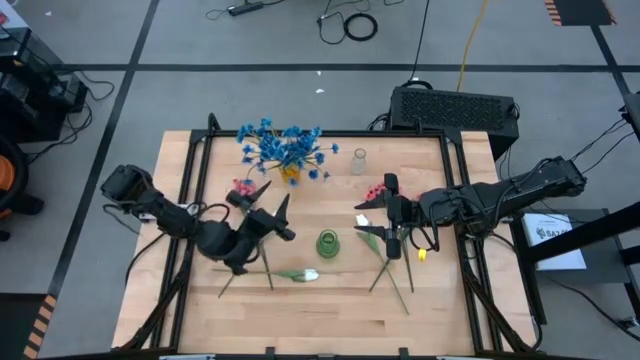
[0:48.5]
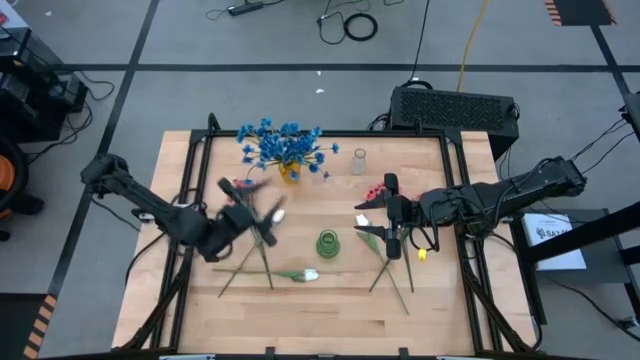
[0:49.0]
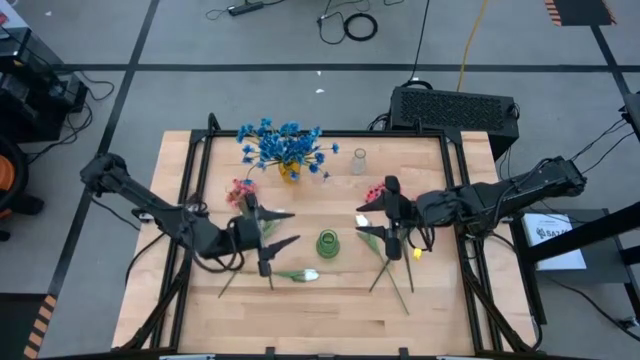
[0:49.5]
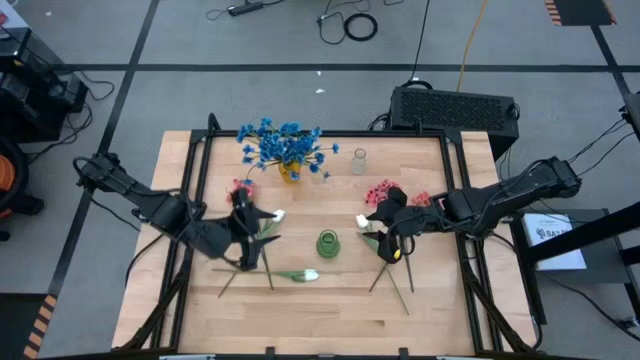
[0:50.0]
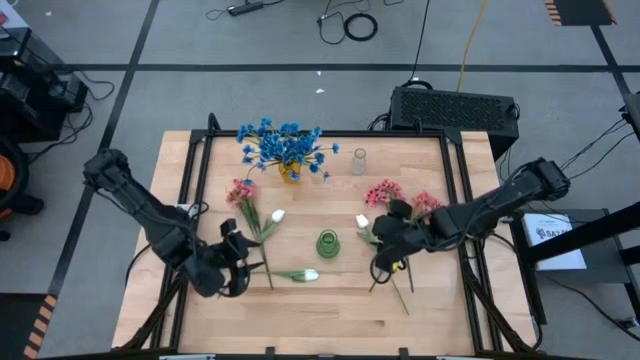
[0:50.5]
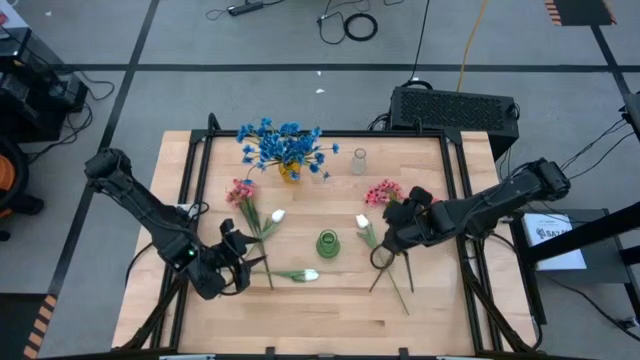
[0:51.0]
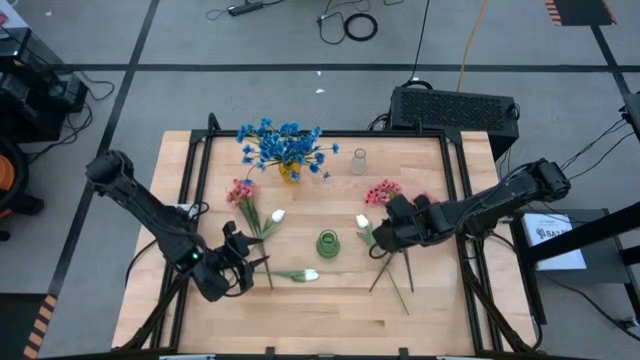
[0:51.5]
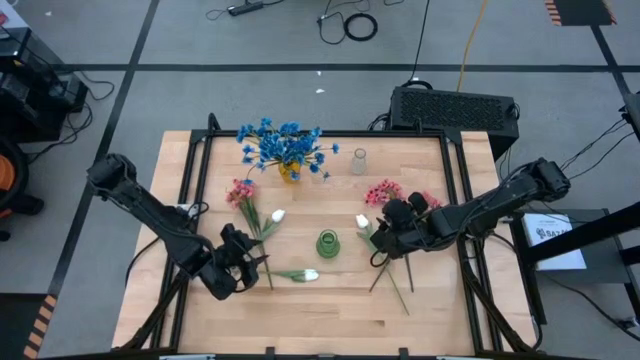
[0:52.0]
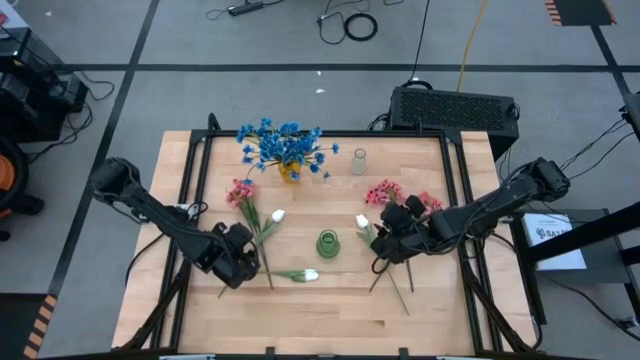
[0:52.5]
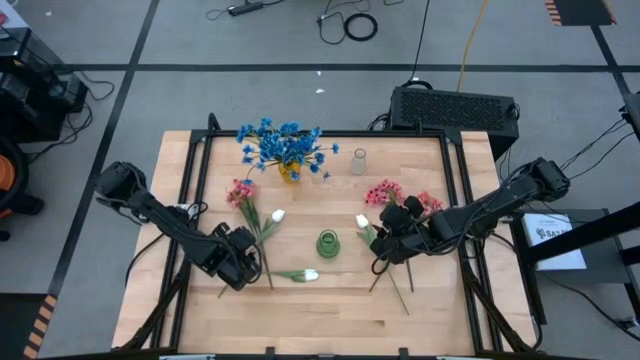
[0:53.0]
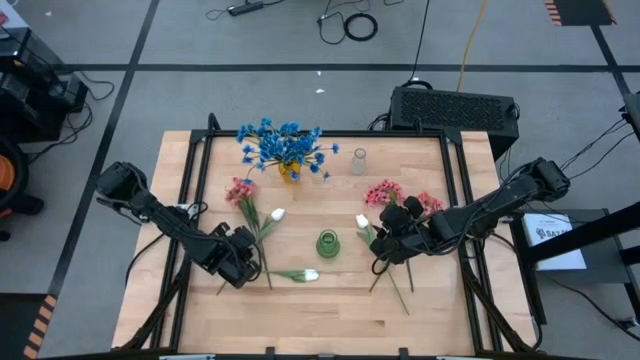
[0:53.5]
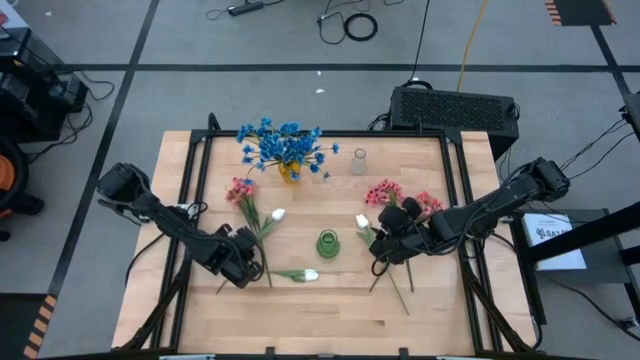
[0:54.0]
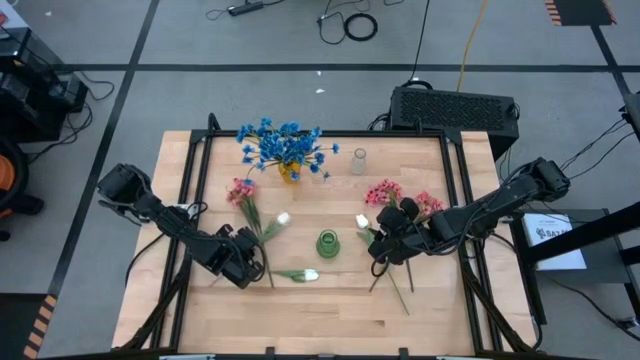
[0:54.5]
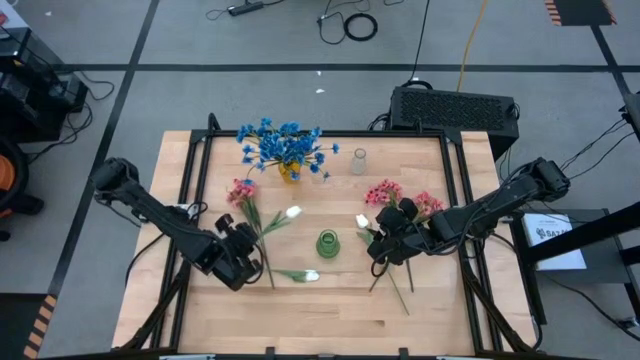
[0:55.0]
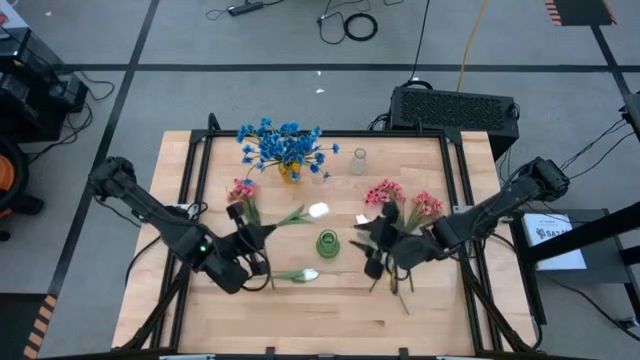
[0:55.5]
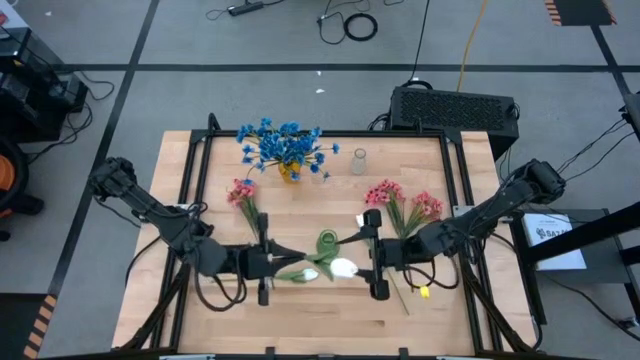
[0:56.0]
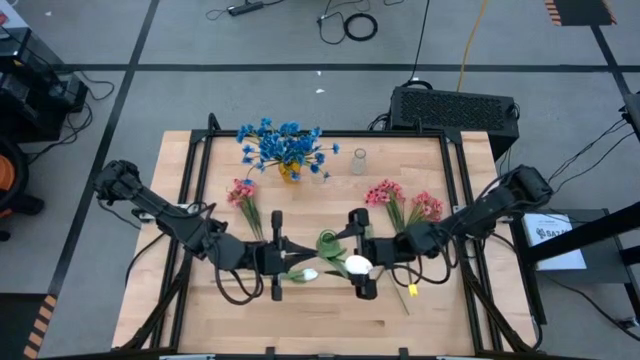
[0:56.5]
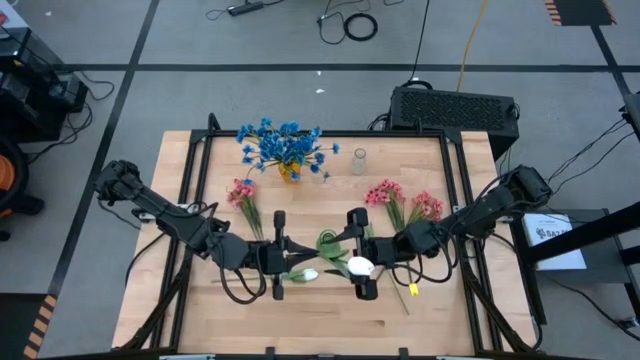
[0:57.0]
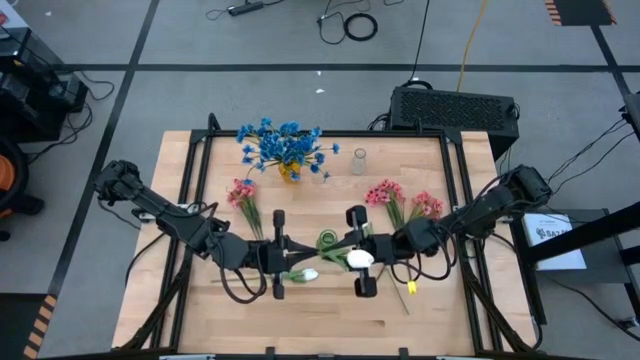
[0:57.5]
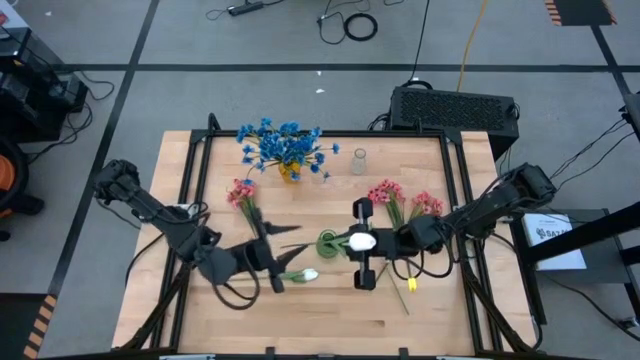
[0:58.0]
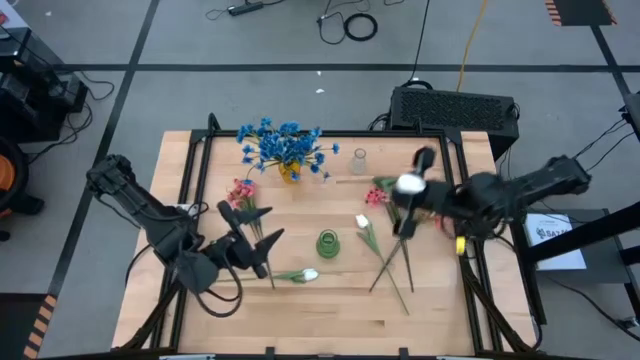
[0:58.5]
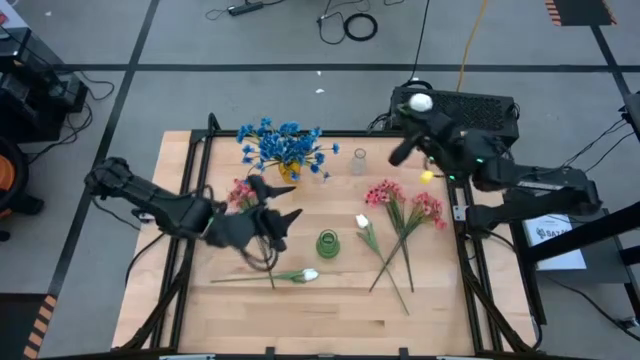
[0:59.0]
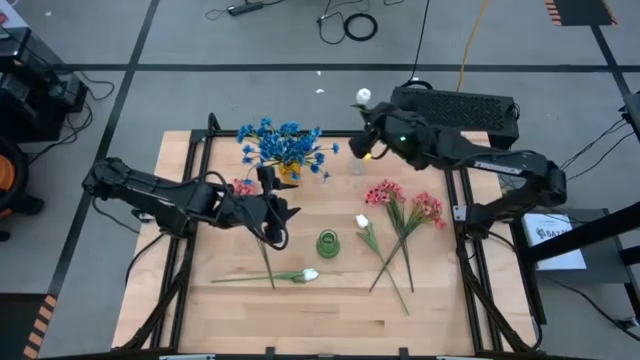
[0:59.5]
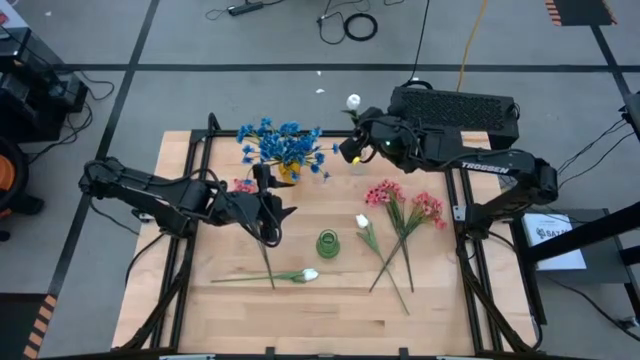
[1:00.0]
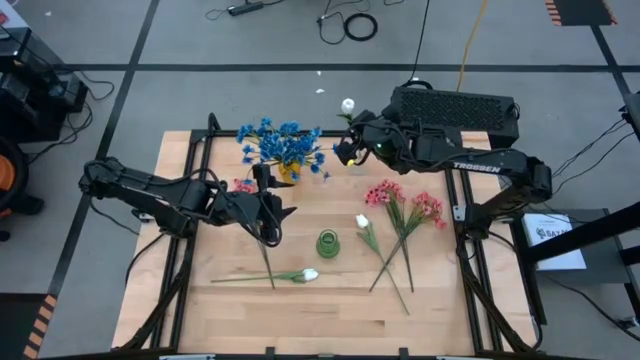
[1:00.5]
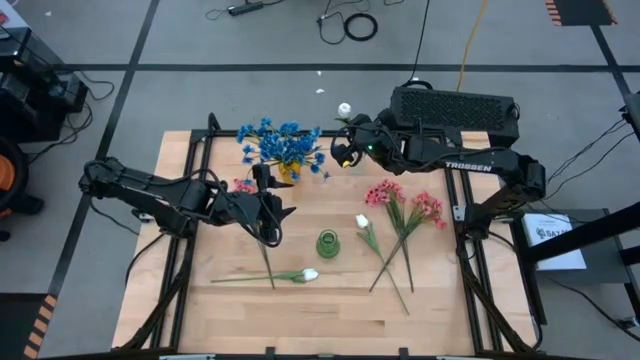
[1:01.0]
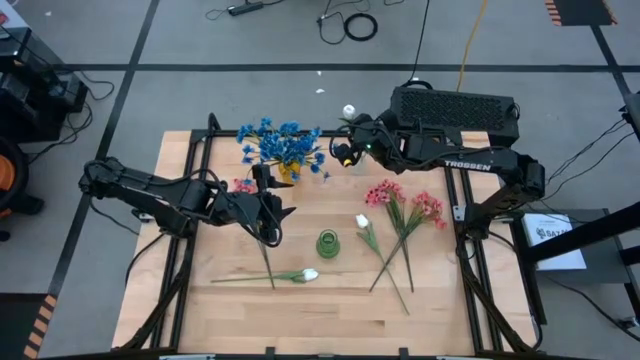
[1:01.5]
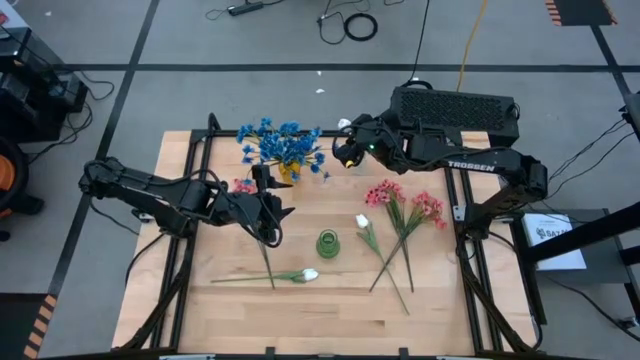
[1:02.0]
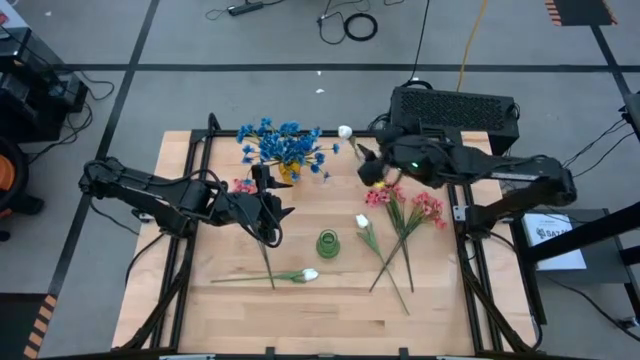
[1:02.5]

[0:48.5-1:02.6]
Task: Sort flowers into vase by color
Put the top left white tulip into the transparent vase

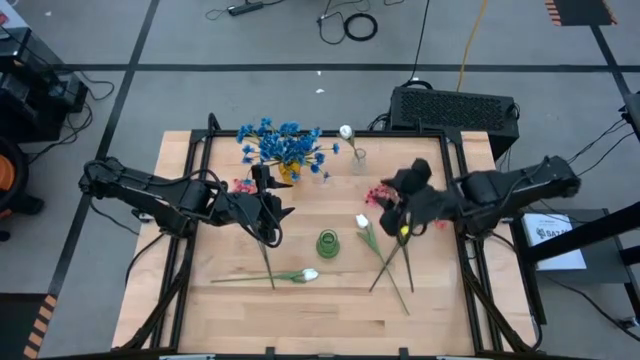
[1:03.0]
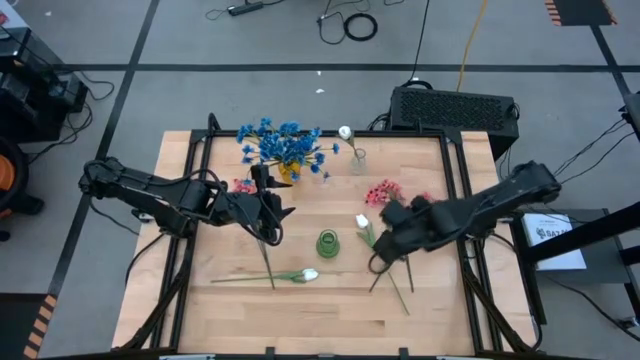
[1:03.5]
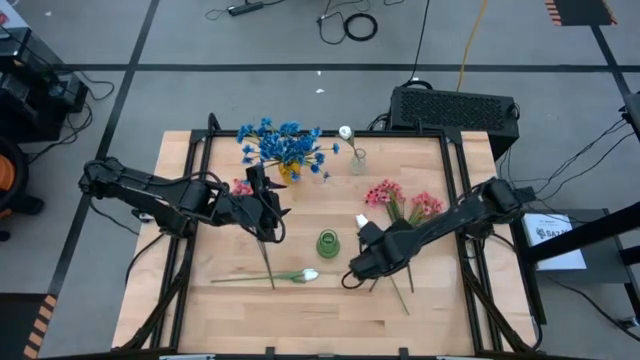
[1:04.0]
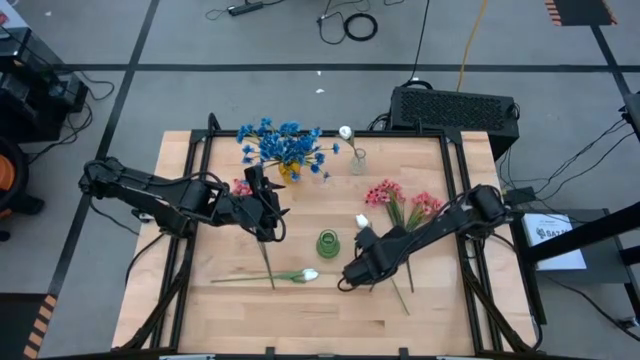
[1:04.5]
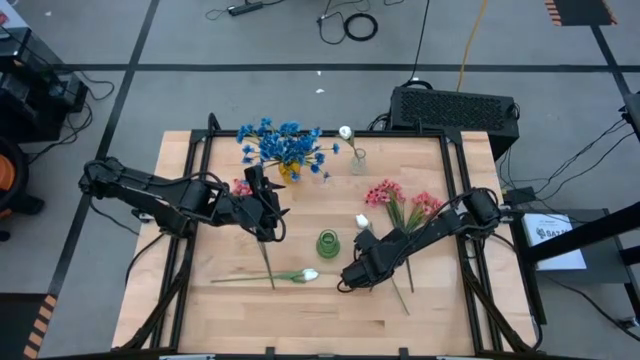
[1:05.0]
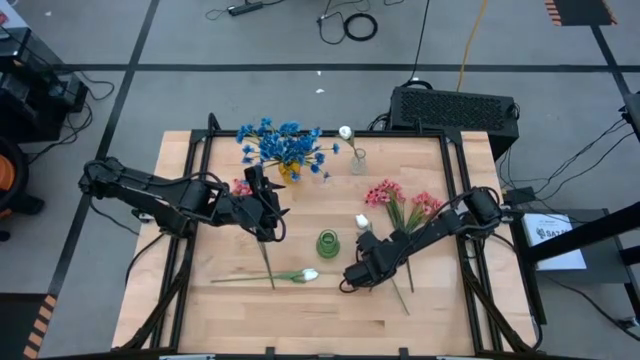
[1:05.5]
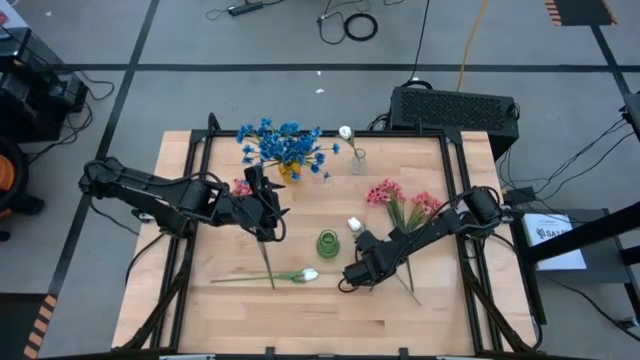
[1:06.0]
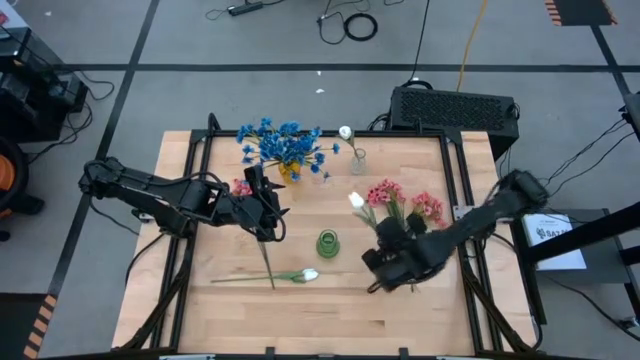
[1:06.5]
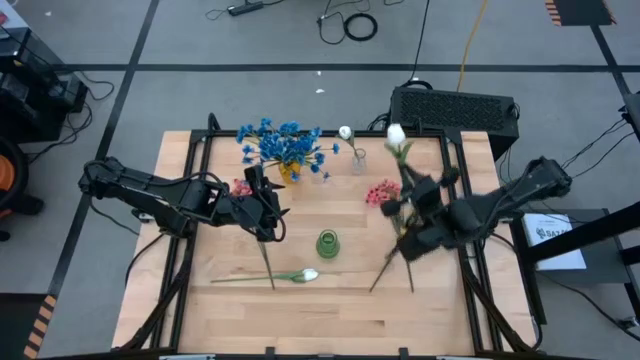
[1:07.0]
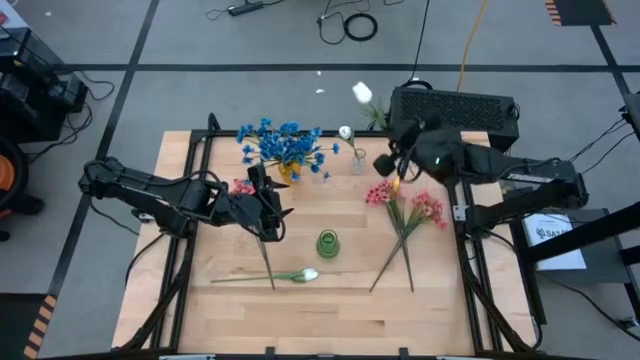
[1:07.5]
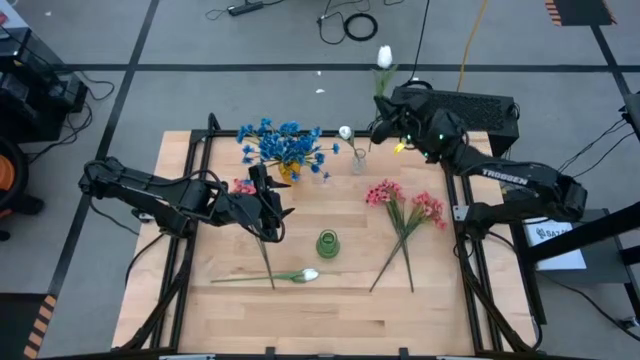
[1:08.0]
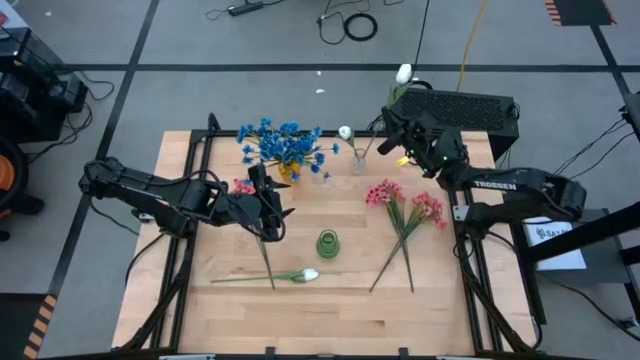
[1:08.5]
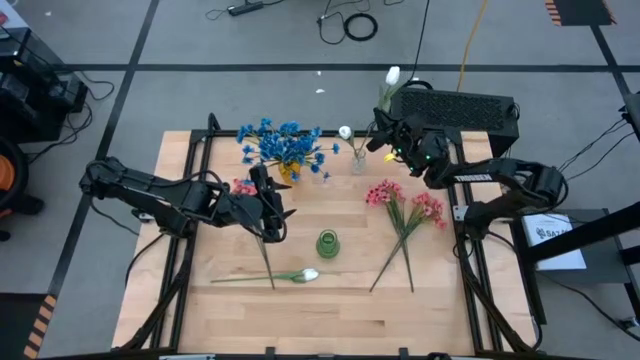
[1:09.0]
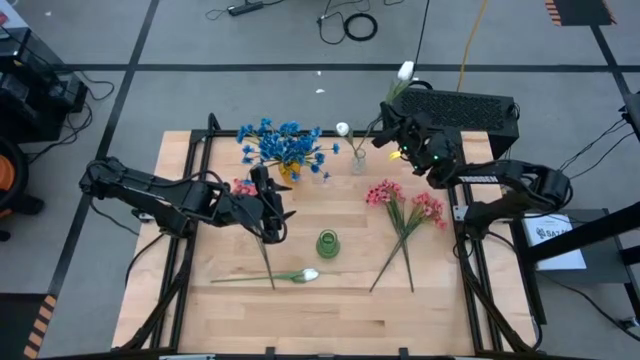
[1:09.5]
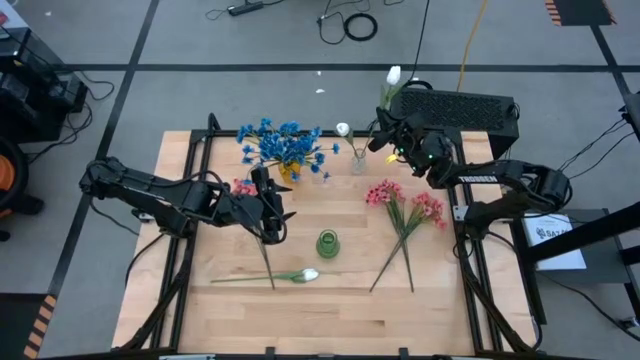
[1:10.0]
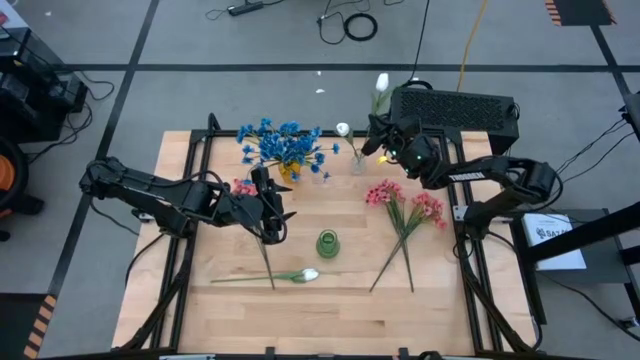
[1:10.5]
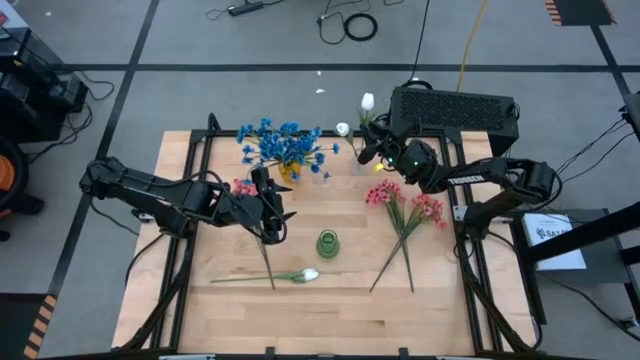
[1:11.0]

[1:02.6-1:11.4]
Put the right white tulip into the transparent vase
